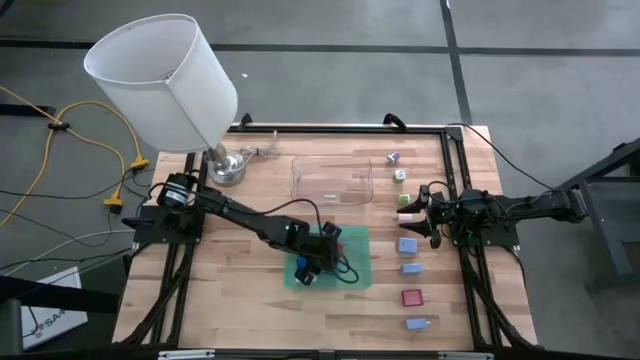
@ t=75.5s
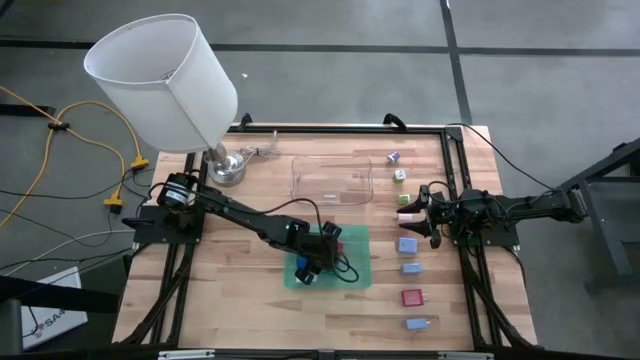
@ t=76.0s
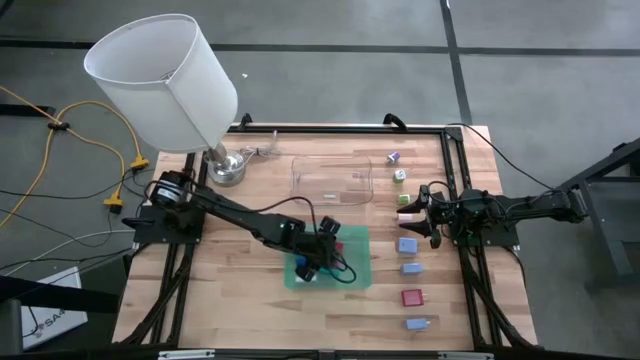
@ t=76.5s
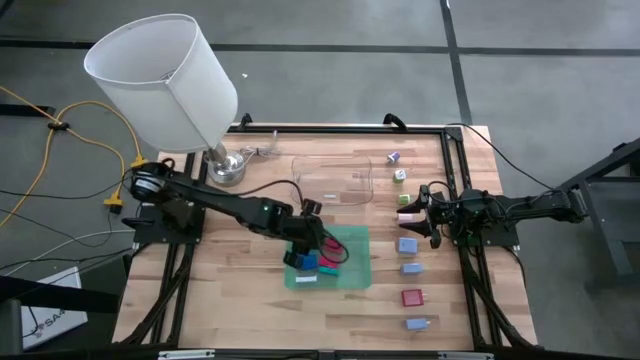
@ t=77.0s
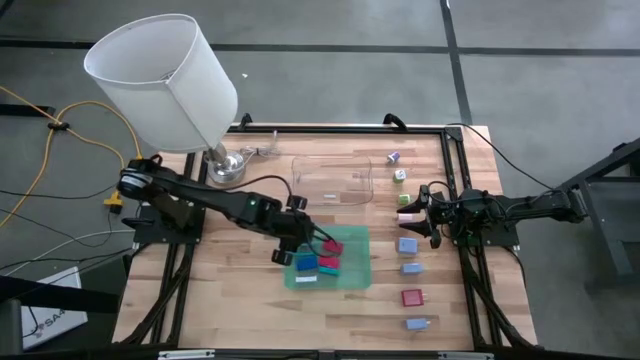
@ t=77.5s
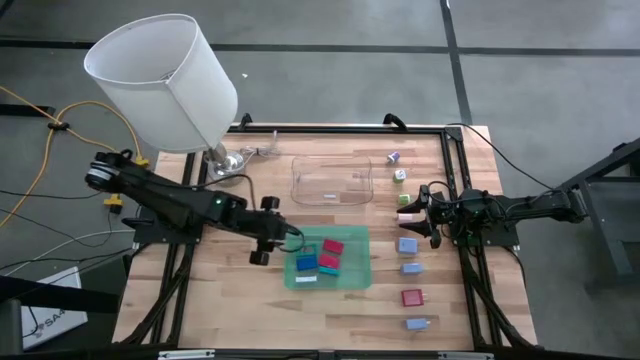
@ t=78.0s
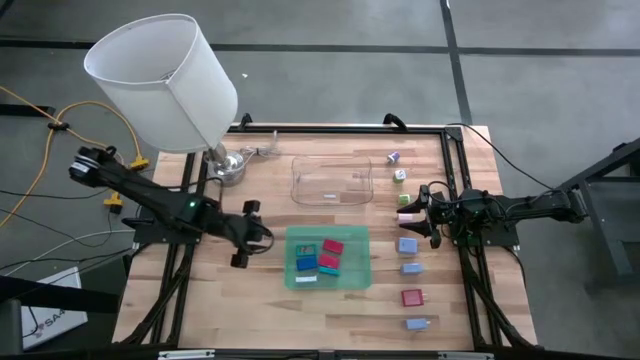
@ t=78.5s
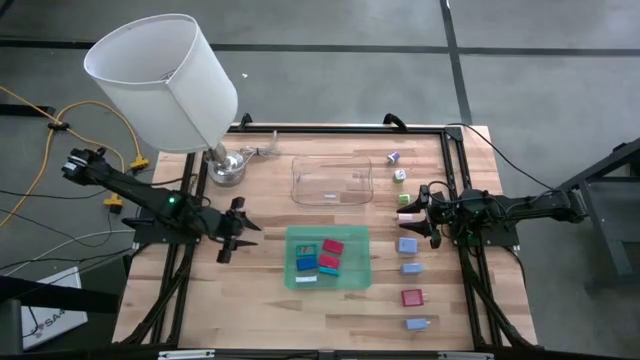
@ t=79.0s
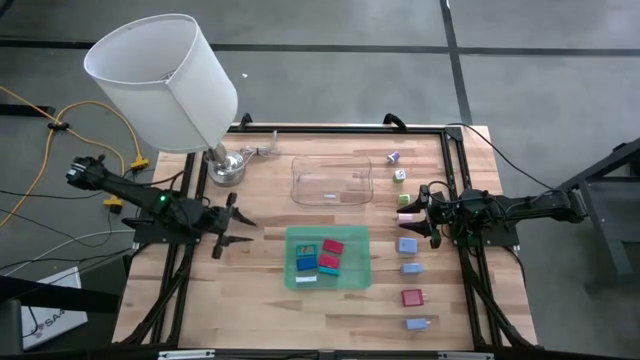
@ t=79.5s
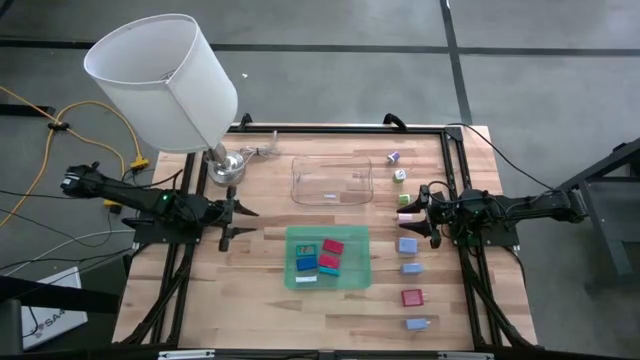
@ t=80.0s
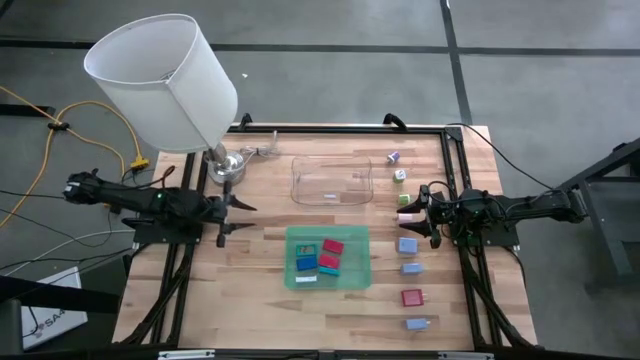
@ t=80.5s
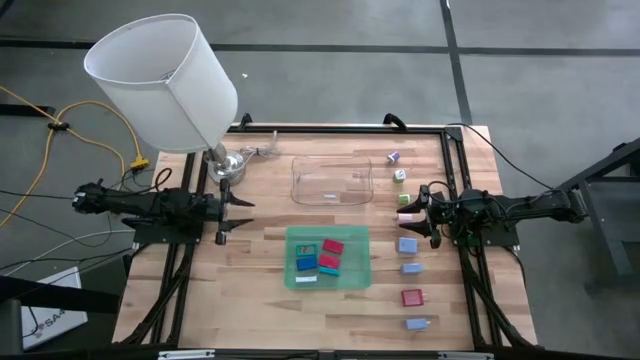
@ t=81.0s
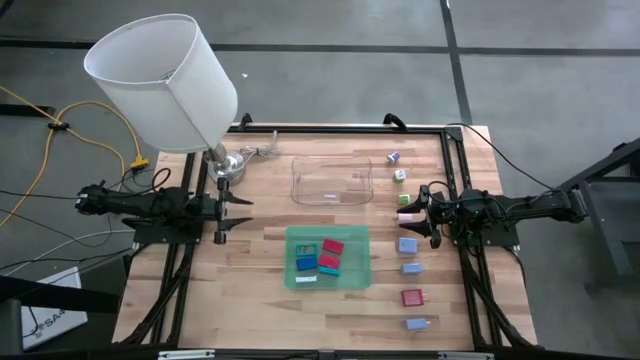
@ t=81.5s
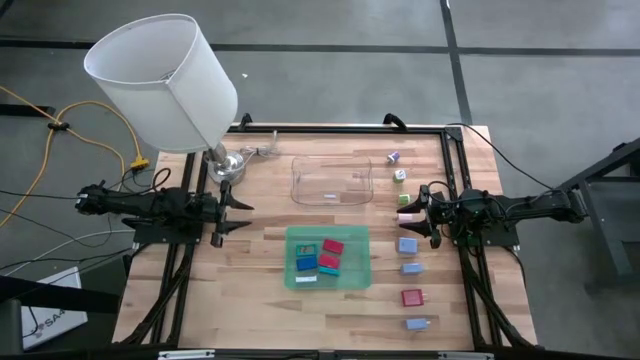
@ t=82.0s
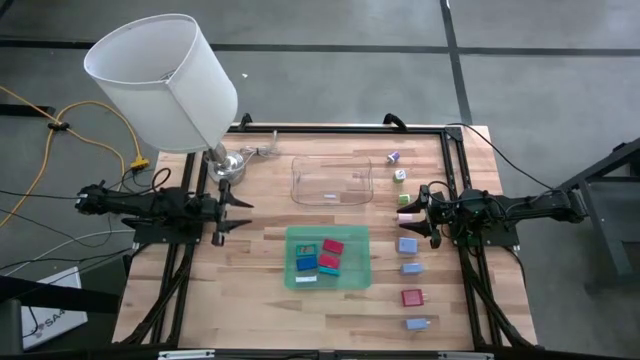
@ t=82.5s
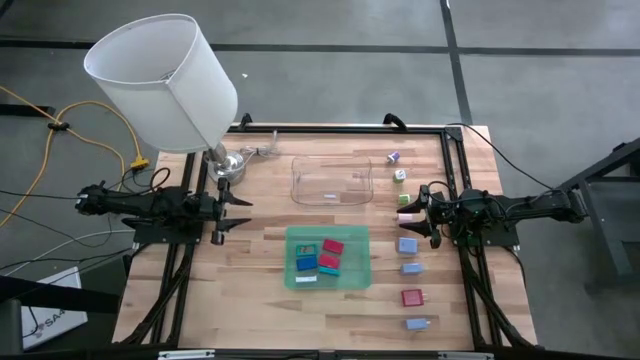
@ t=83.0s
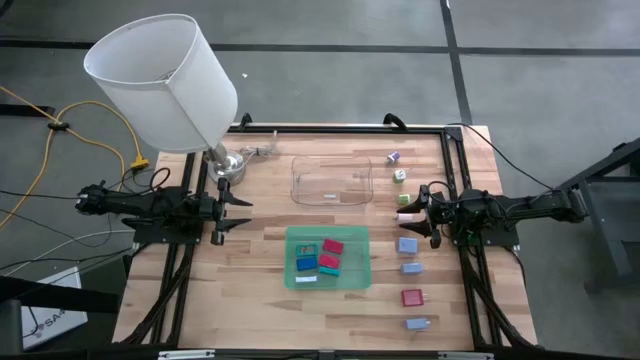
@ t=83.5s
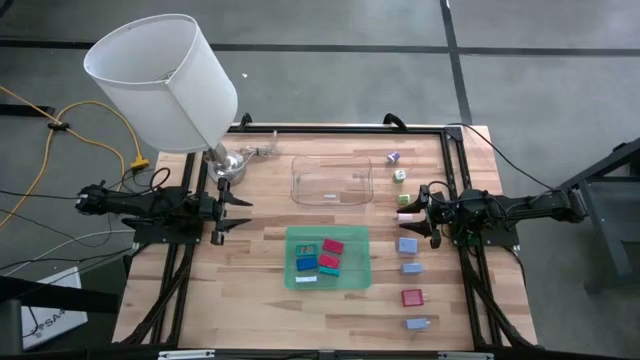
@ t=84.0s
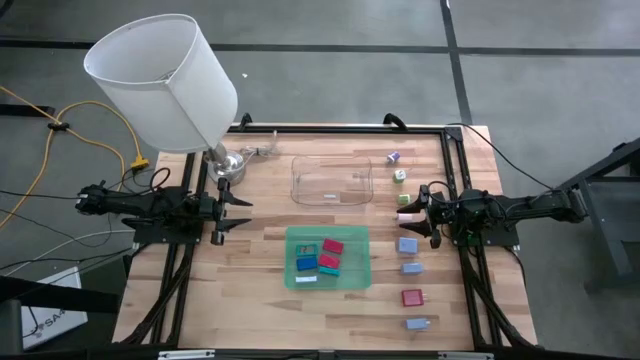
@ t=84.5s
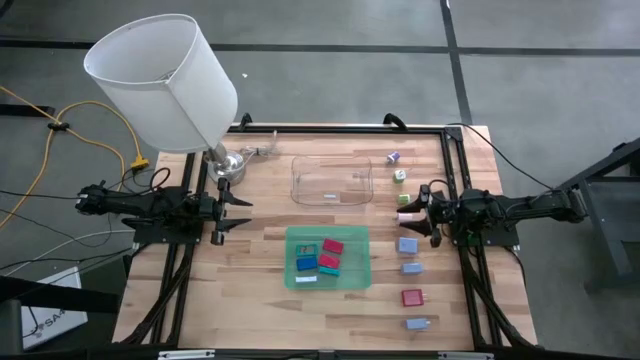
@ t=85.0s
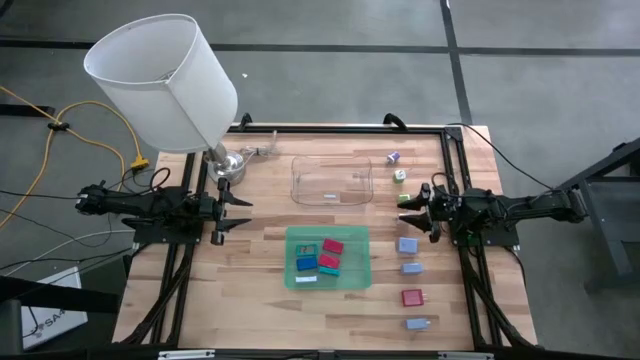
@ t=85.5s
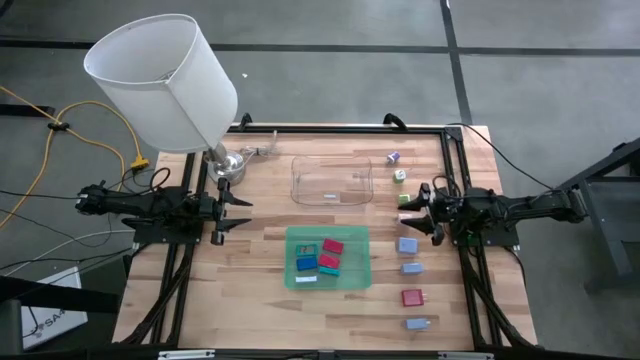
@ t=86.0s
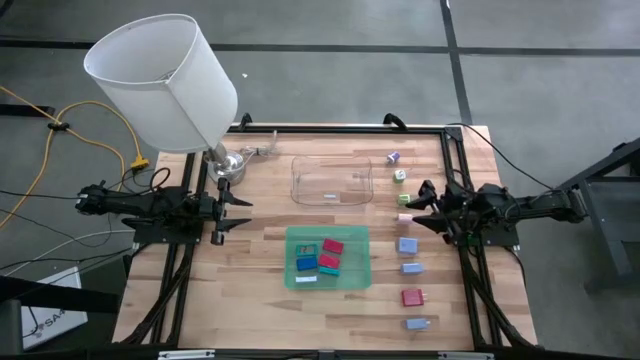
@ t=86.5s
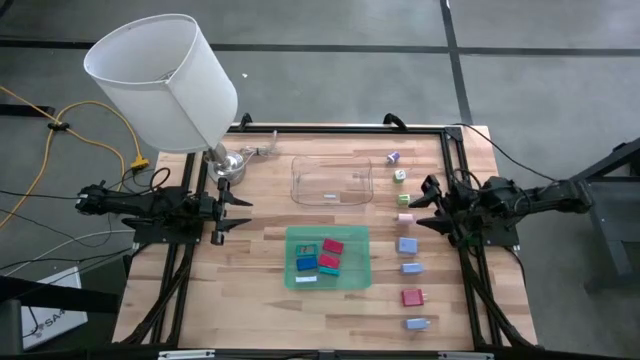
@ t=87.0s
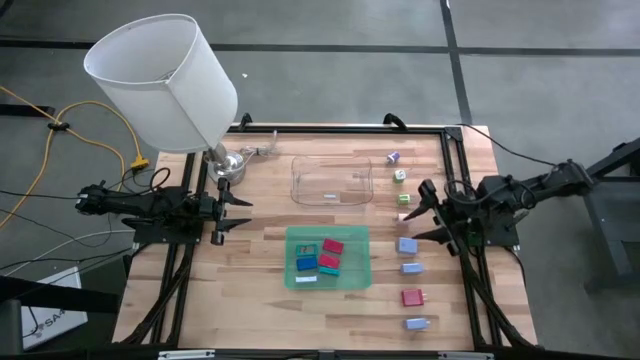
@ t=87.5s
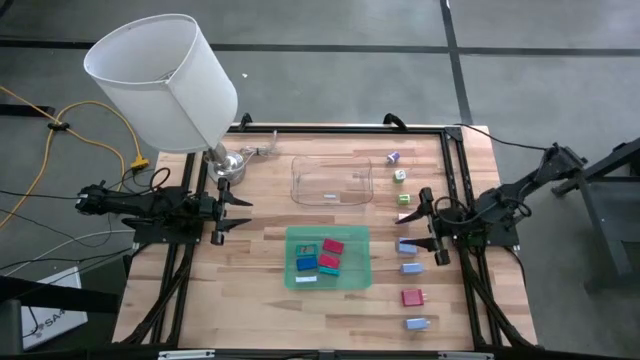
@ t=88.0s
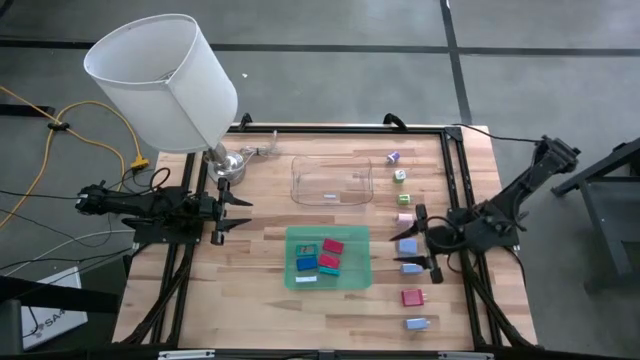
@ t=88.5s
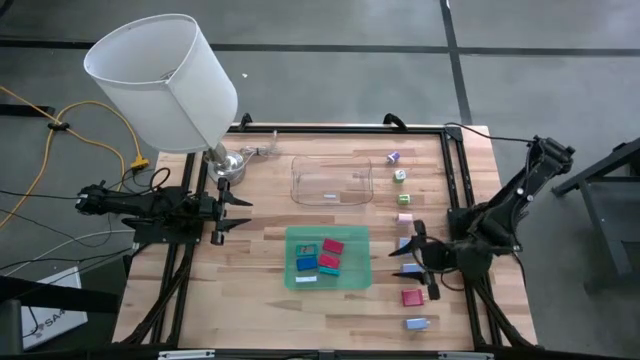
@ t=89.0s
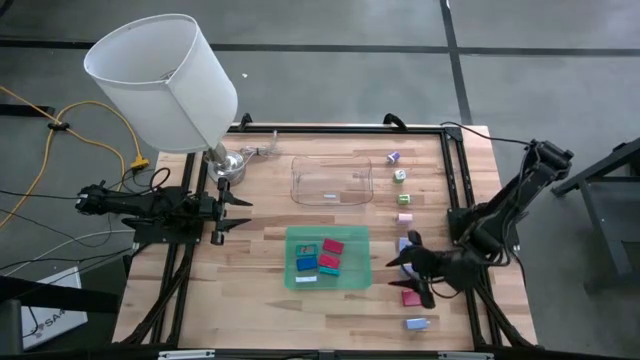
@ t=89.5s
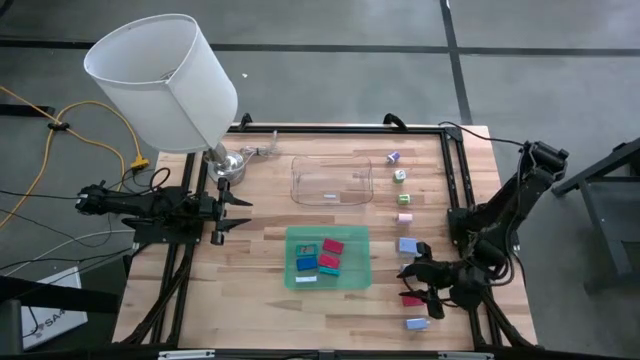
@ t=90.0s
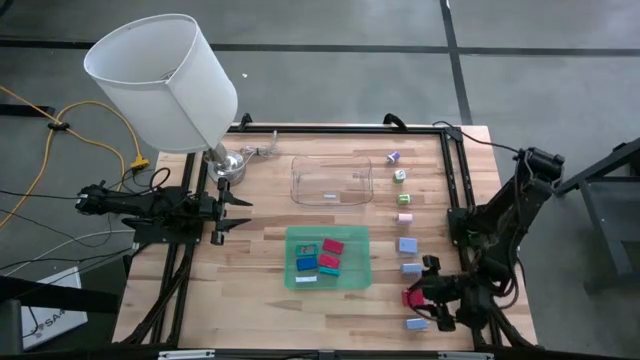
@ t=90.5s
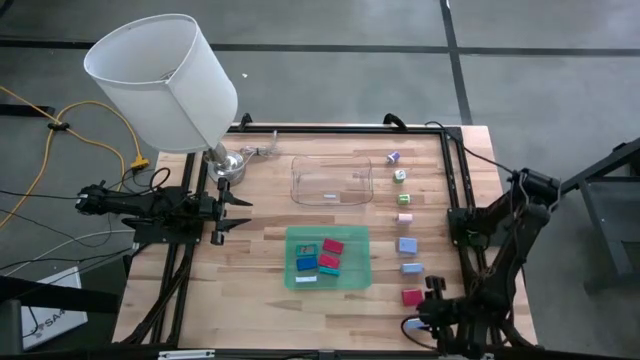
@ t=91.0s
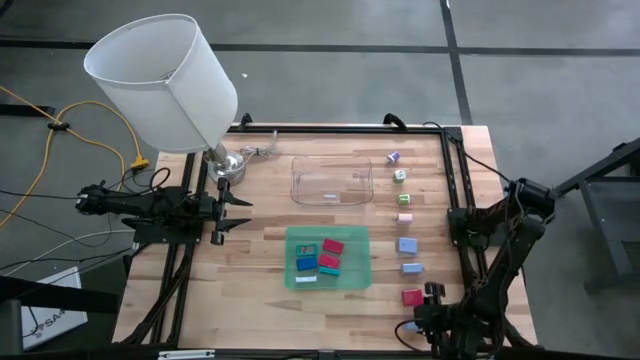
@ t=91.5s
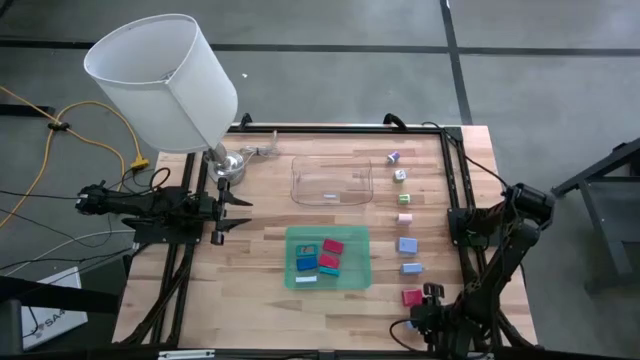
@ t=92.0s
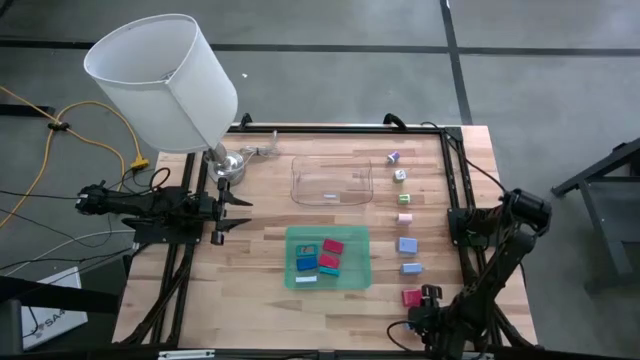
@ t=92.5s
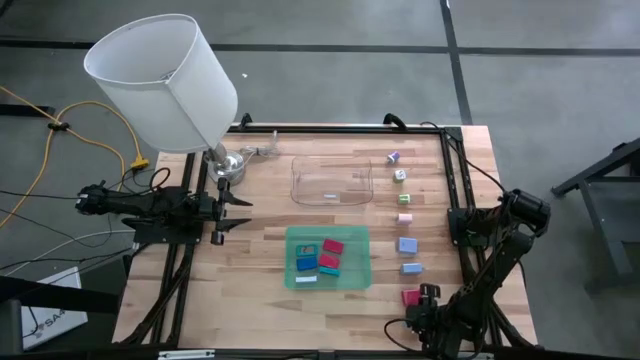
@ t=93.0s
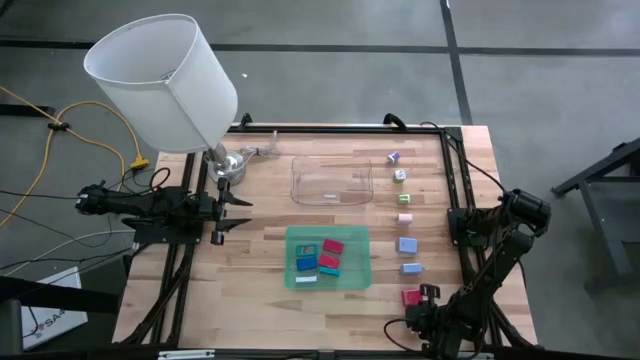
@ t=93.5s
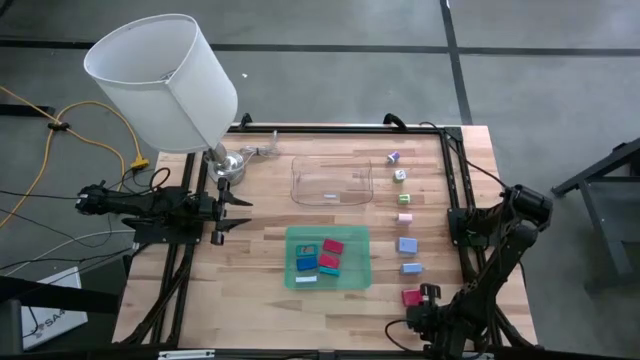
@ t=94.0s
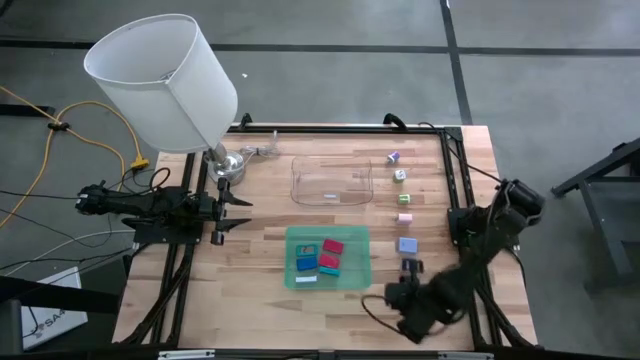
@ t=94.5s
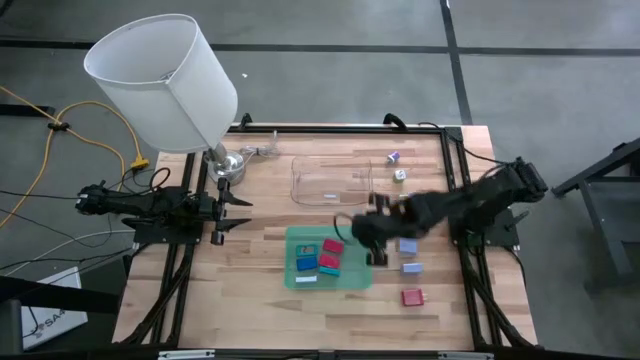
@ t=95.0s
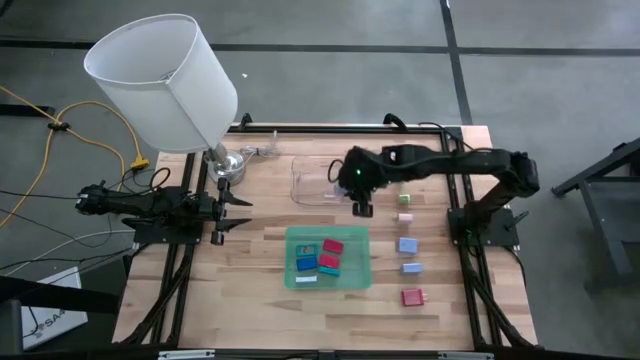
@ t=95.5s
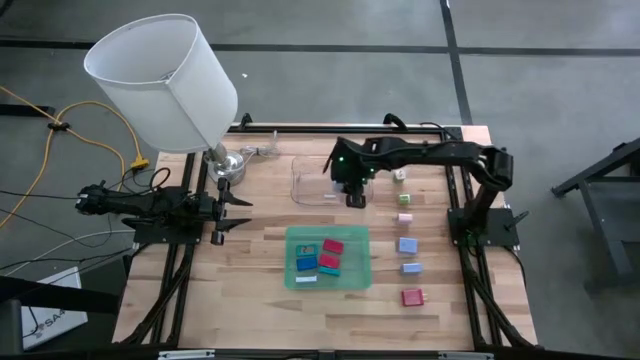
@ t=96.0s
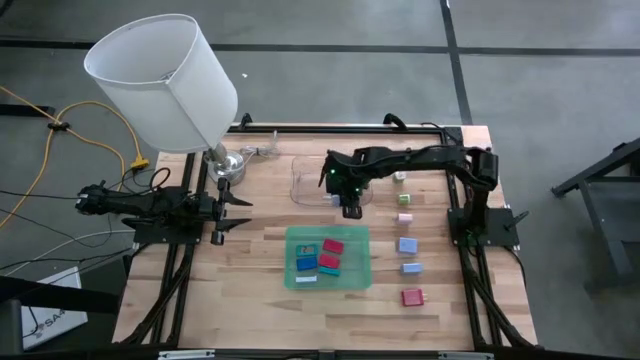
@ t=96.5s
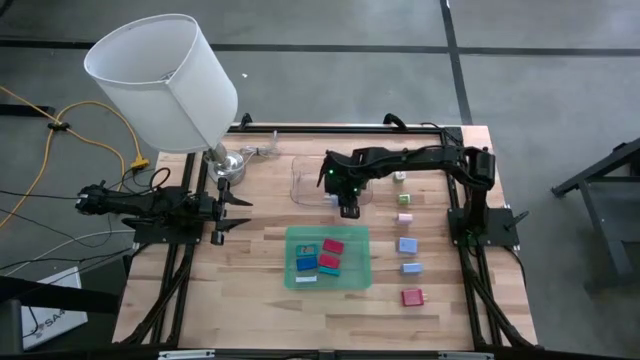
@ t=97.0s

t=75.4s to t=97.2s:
Task: Pick & Place Office items
Put the bottom purple charger adapter into transparent bin
